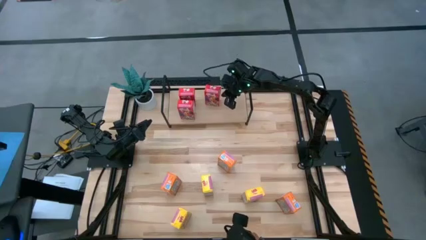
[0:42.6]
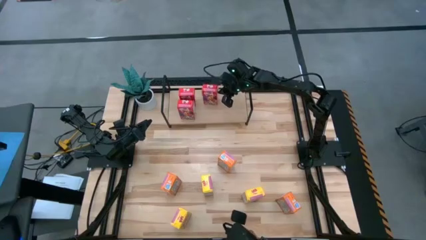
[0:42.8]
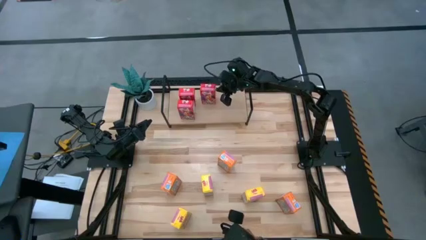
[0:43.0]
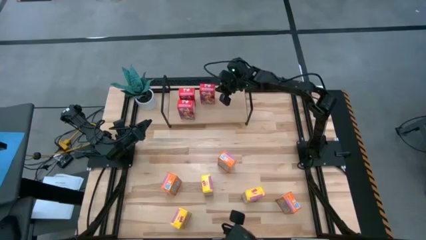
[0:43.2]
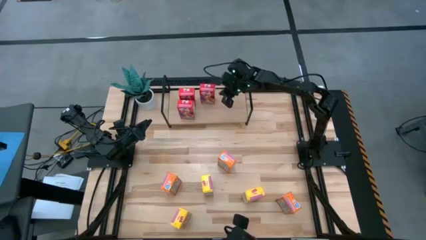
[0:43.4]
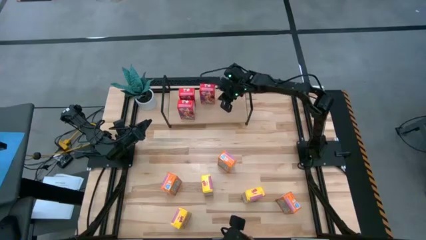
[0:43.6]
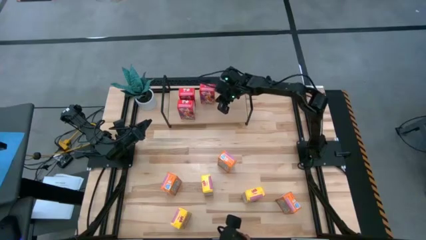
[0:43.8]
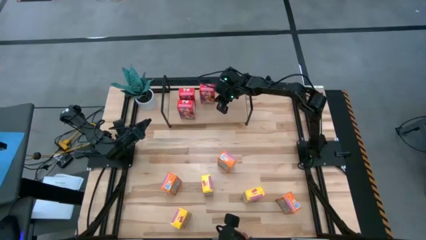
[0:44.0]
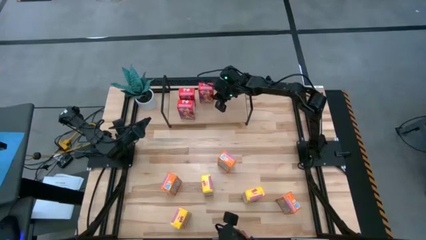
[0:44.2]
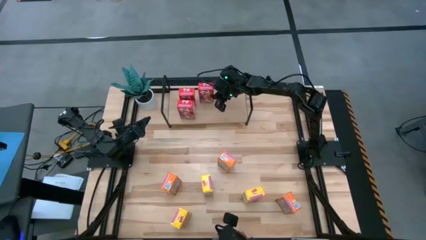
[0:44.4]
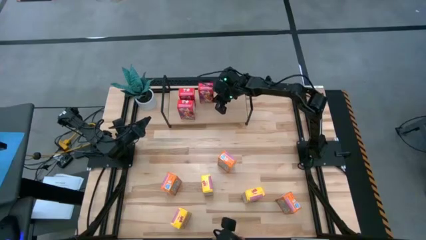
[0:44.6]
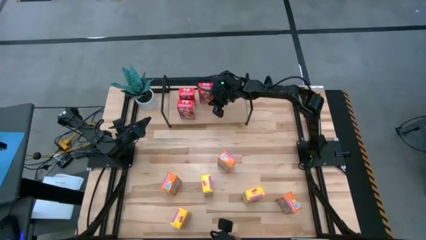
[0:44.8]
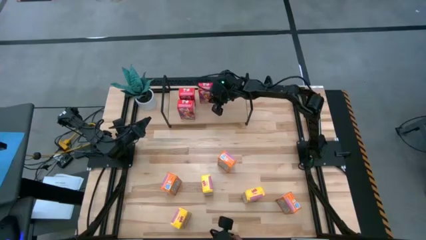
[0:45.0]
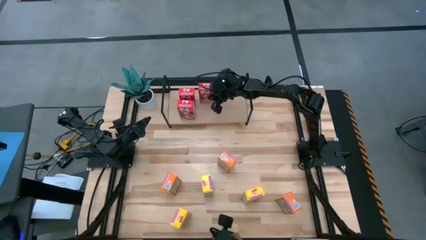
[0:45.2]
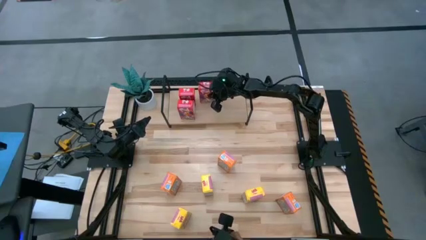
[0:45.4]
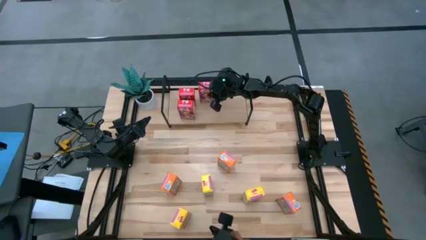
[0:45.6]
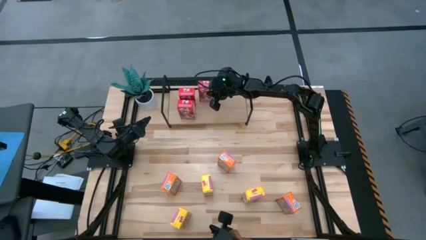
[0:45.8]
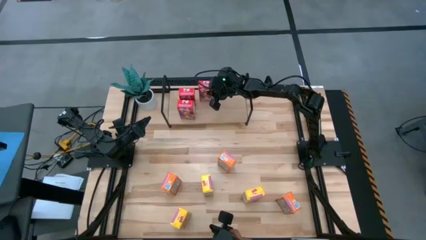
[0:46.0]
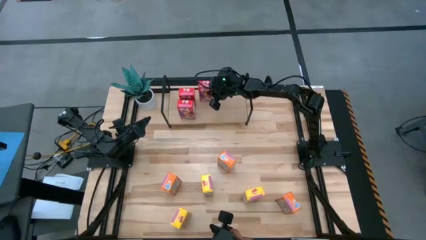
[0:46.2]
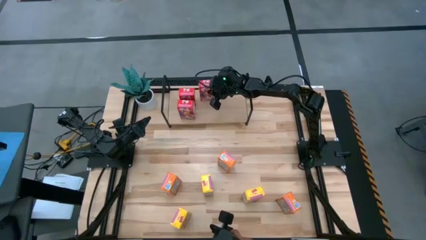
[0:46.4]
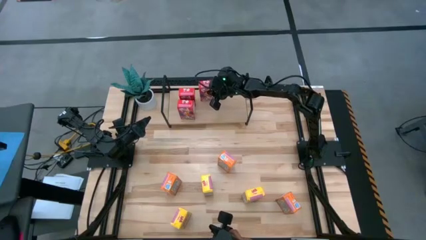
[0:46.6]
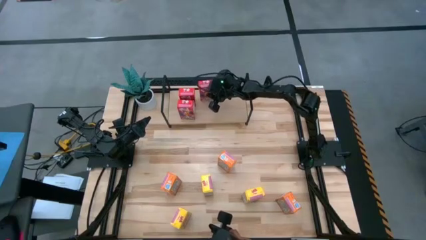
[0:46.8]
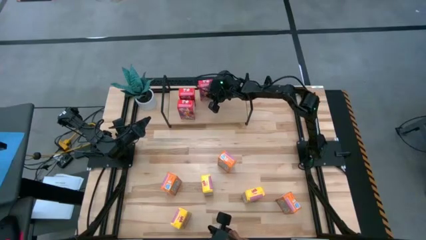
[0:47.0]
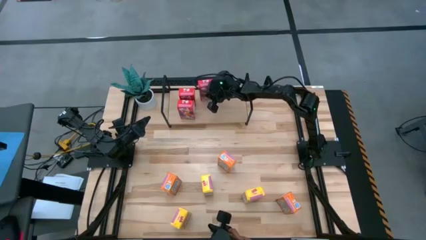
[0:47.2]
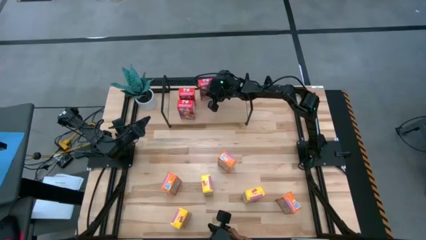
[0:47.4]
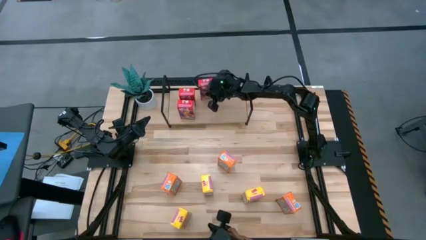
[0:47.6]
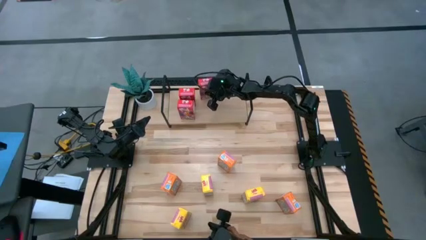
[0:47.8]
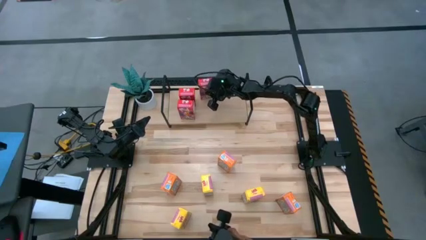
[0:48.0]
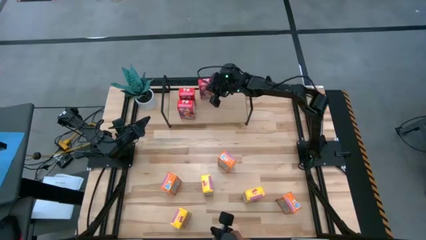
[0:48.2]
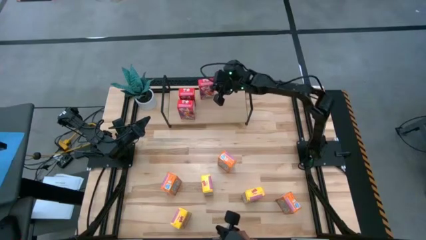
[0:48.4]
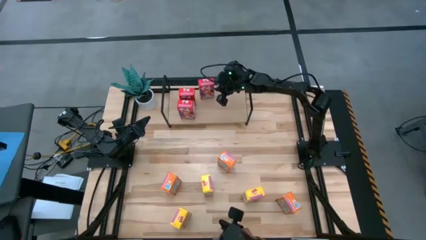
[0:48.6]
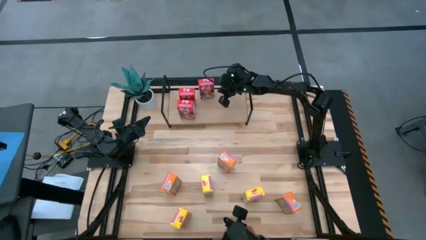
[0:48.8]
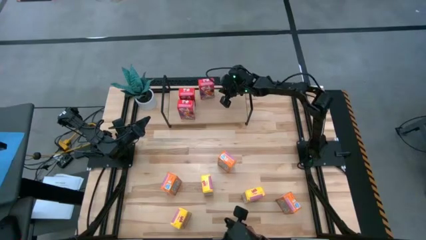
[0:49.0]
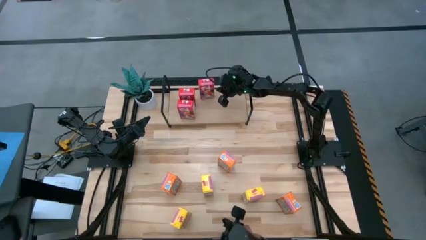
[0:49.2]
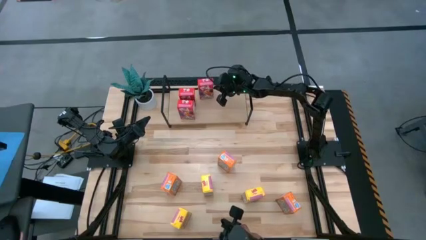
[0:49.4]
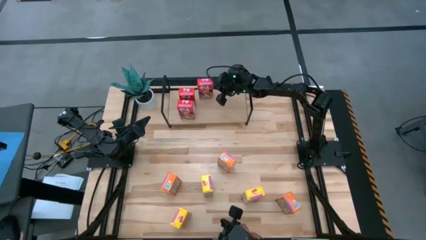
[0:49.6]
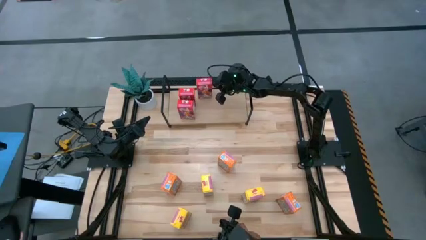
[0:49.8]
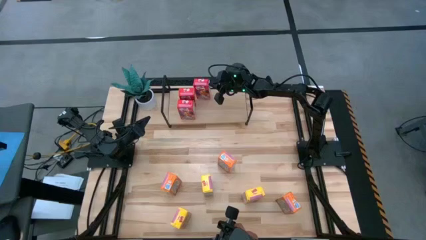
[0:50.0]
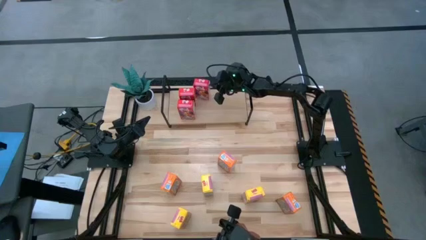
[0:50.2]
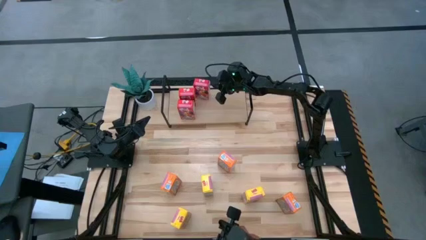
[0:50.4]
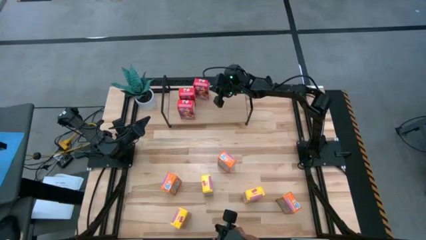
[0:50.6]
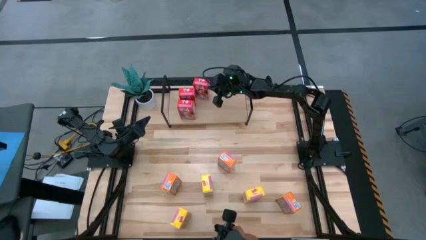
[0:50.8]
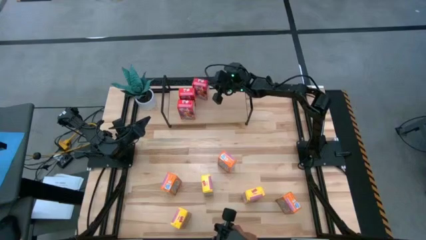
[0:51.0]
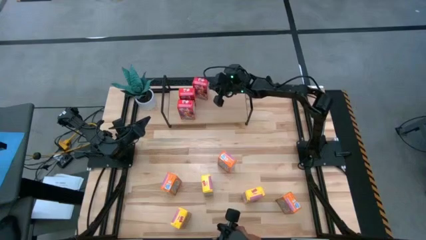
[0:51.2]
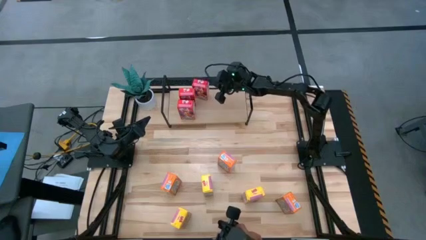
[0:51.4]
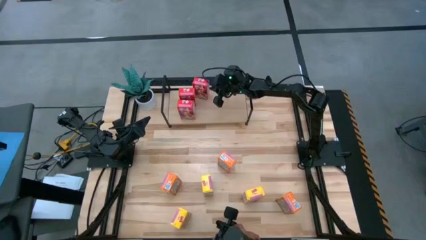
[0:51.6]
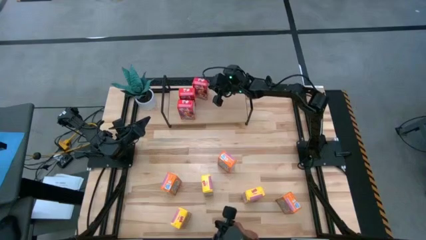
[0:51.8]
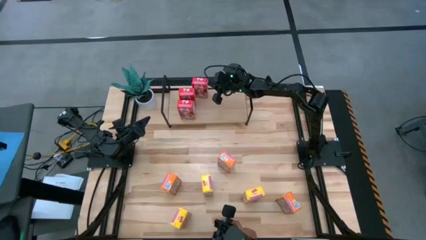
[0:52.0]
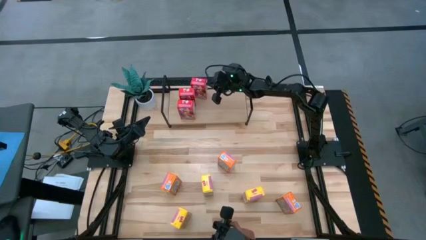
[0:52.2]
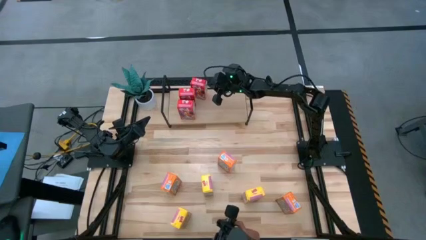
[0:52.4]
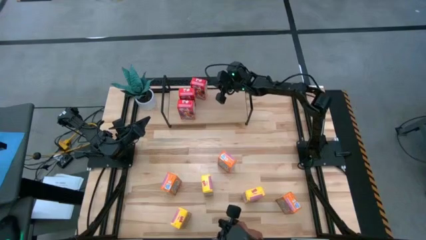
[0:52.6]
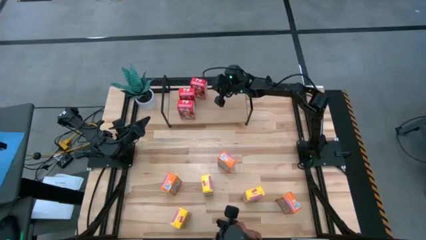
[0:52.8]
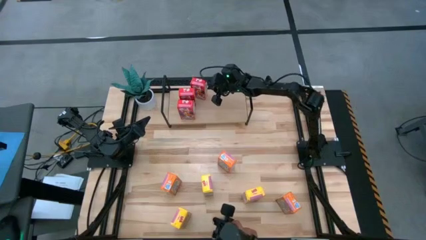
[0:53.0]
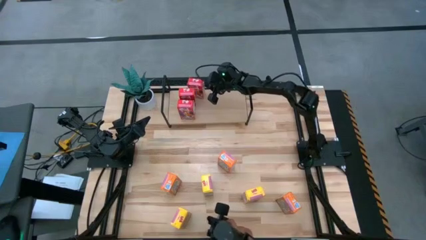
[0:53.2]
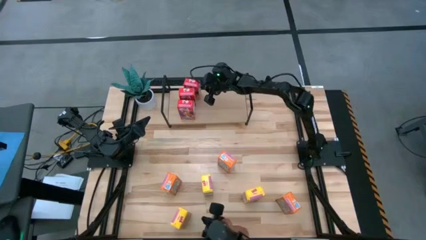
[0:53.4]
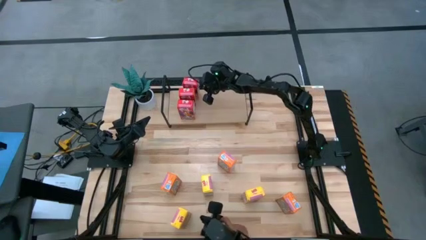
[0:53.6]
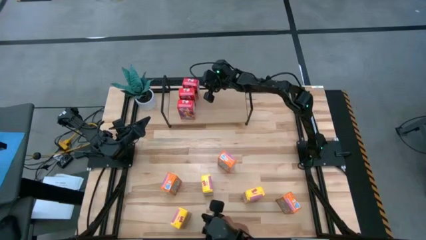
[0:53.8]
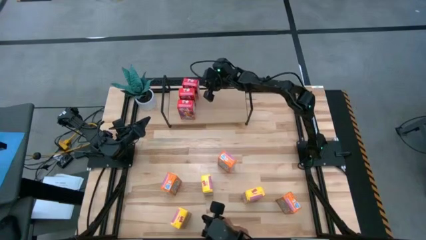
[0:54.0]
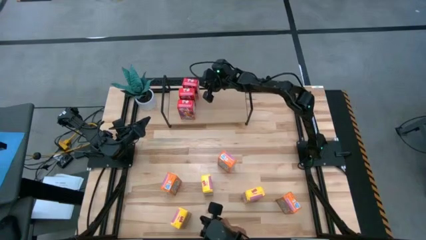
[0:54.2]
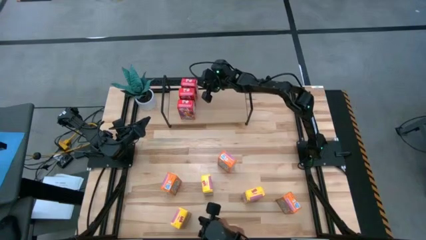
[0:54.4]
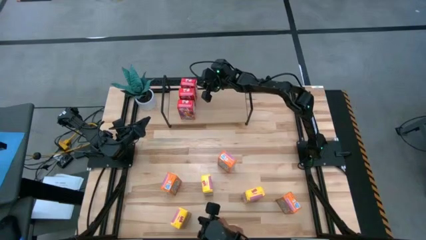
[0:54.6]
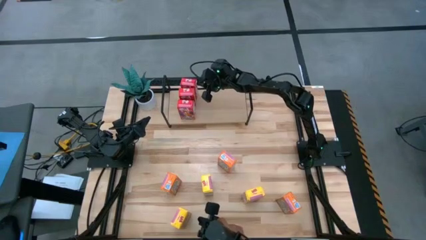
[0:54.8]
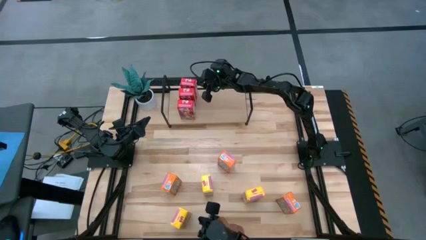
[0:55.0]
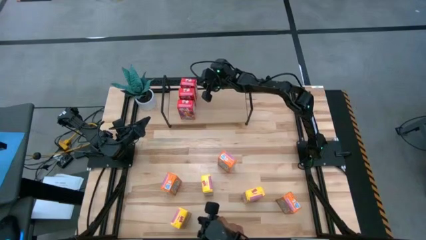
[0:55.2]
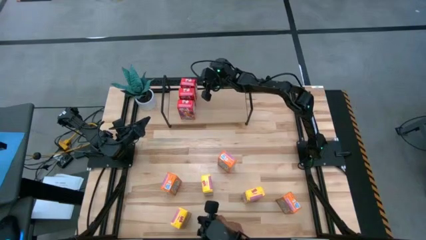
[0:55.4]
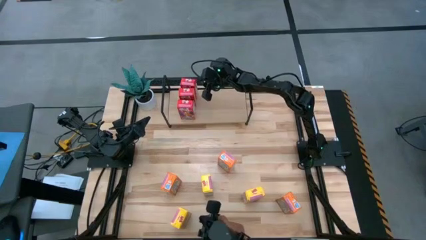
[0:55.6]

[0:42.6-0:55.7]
Task: Stack cereal on shelf
Put the red cereal box on the shelf aligned with the other red cereal boxes
